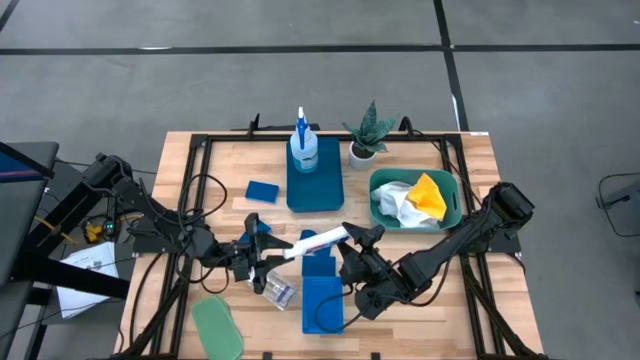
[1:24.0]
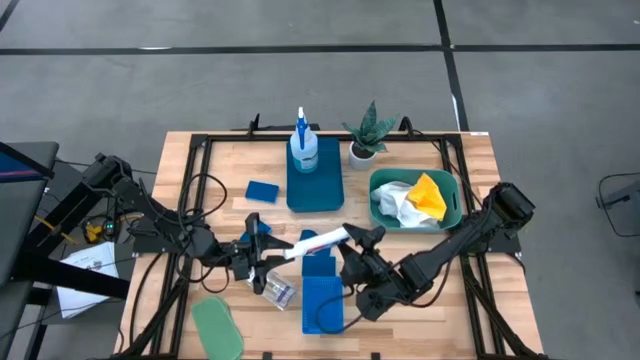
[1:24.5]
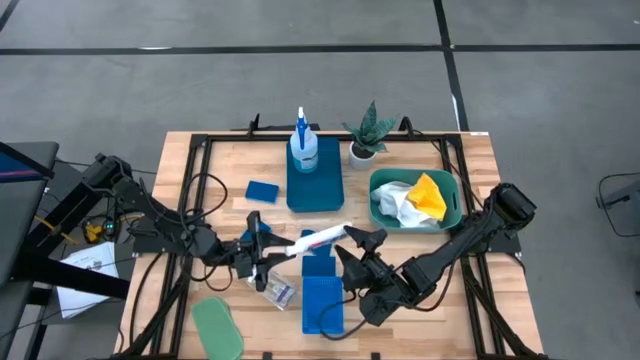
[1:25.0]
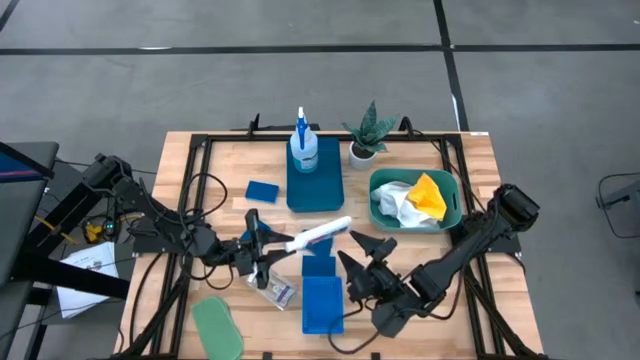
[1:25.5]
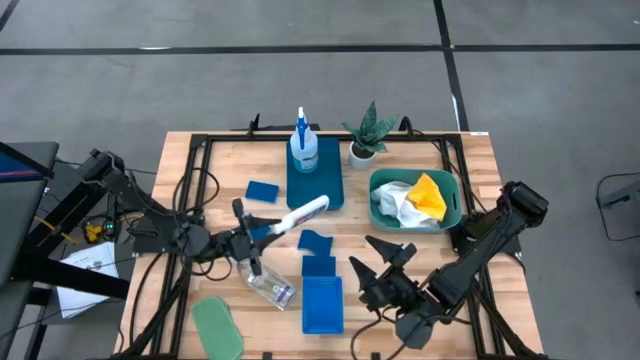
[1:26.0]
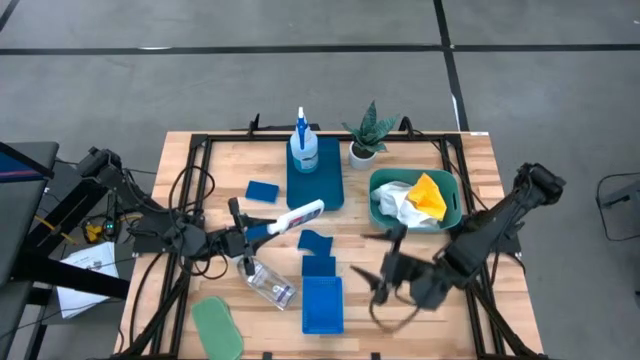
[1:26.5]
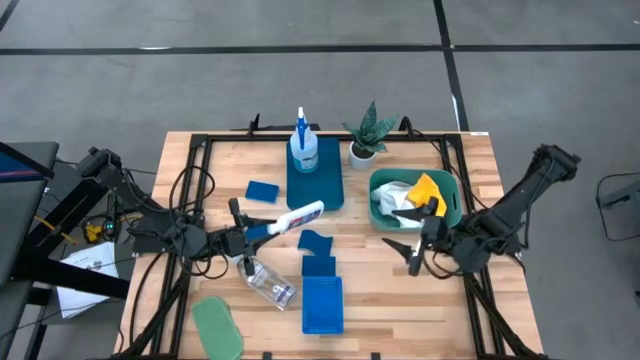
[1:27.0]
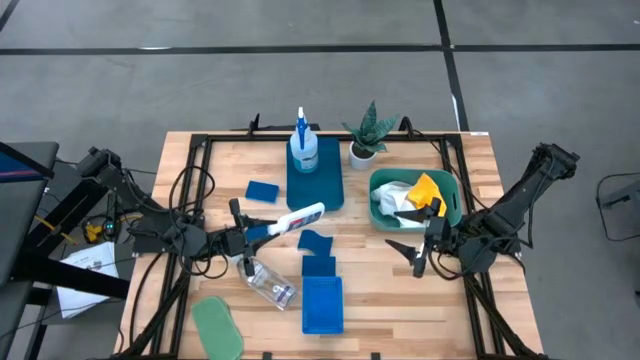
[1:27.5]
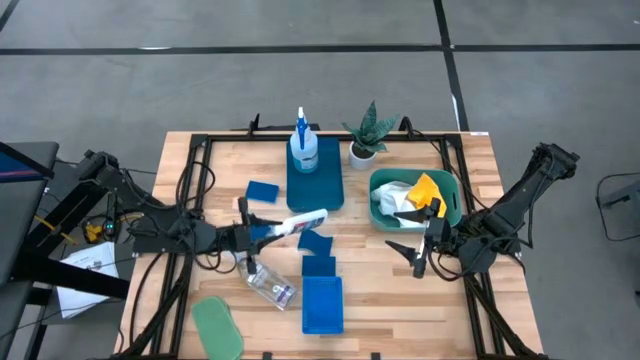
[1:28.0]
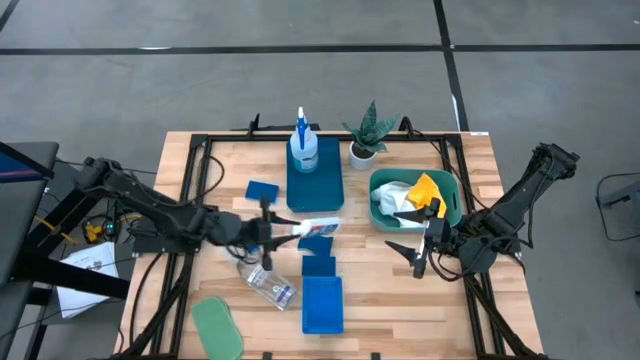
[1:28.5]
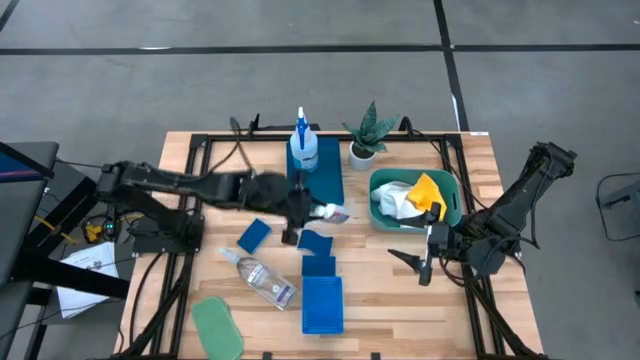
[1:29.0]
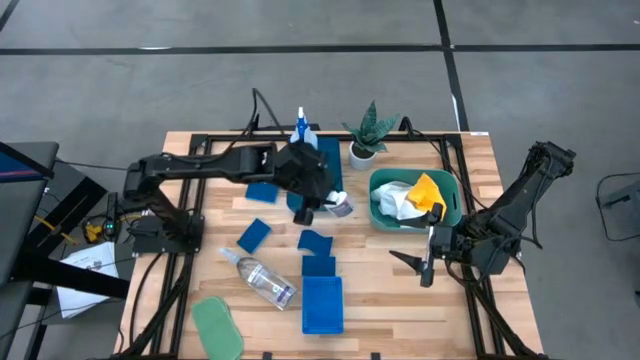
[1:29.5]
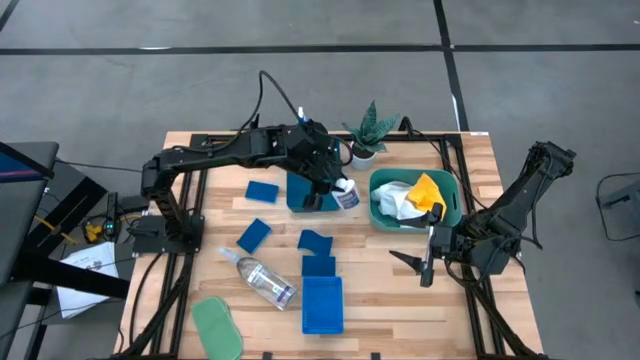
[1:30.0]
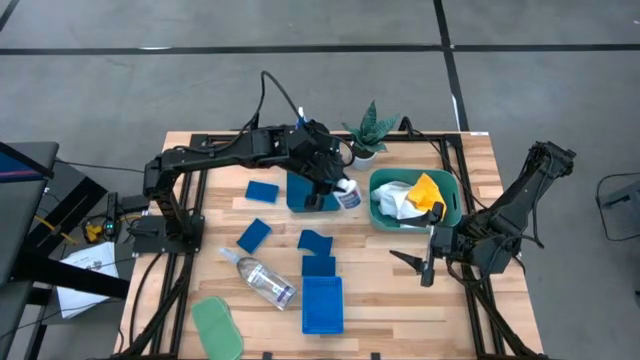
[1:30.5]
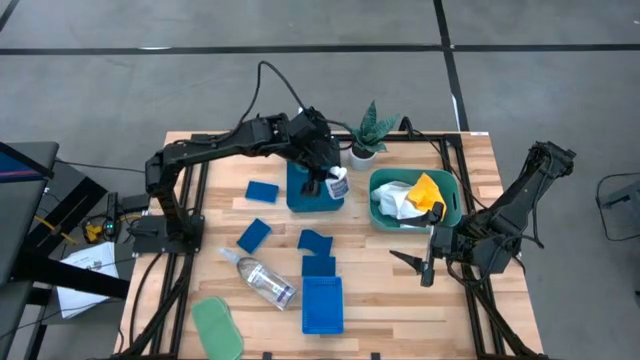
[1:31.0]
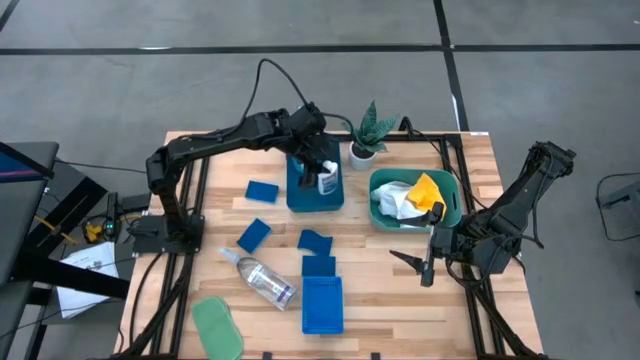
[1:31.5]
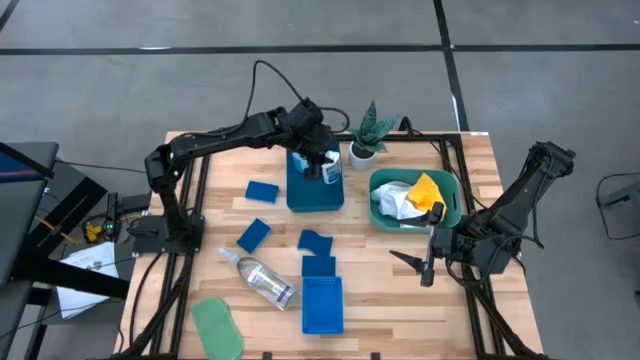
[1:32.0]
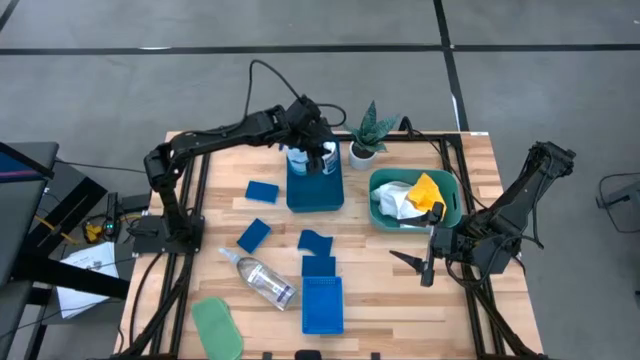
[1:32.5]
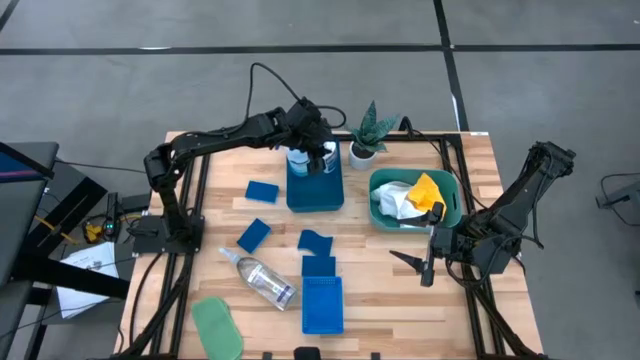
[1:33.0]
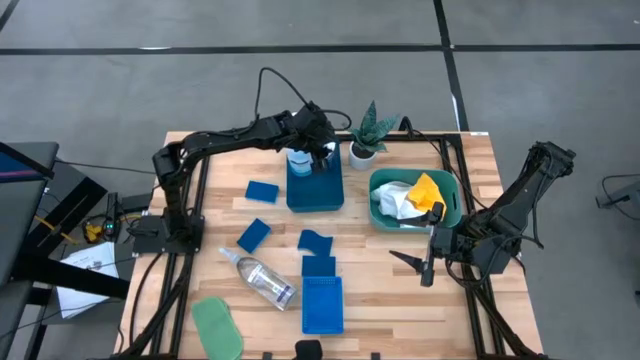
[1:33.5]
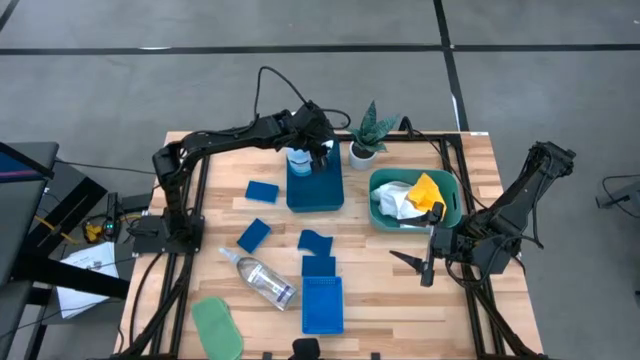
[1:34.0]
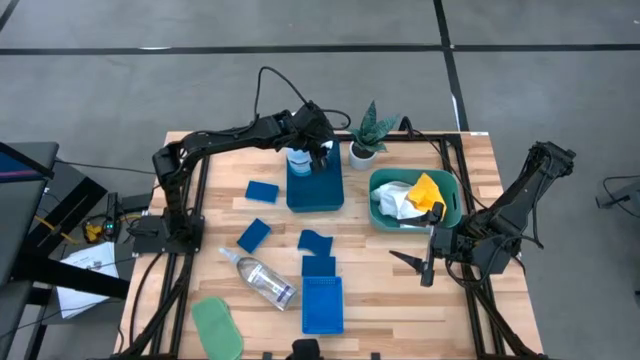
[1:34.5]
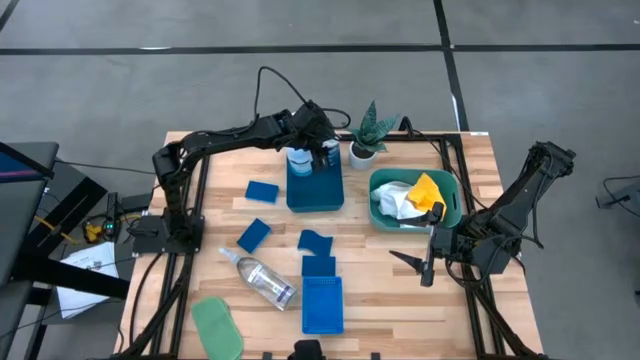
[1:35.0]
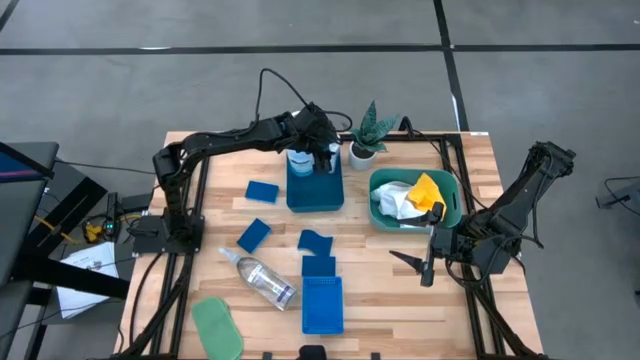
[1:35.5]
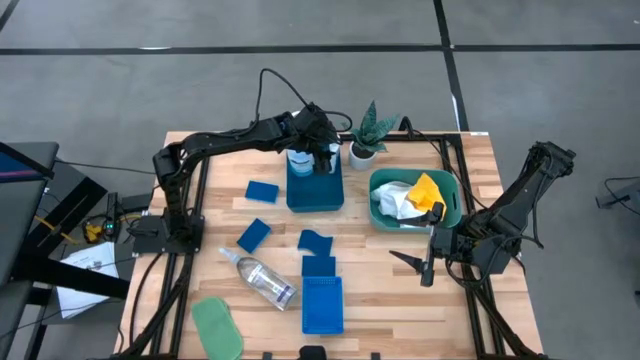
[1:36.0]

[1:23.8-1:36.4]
Task: Pick & Place Kitchen Items
Put the white plastic restorer bottle into the blue bin

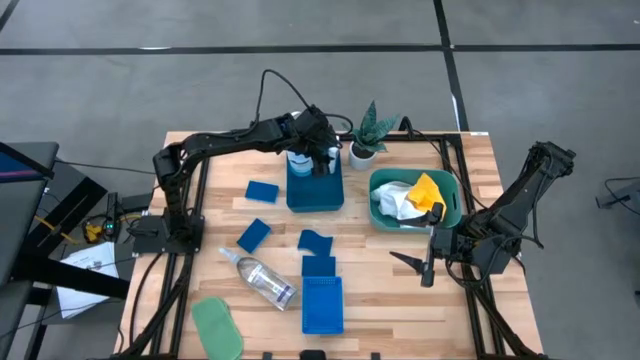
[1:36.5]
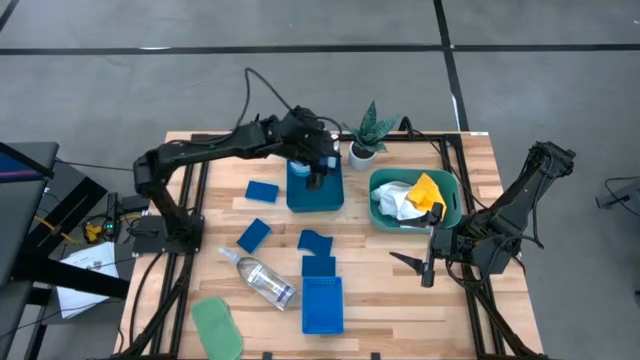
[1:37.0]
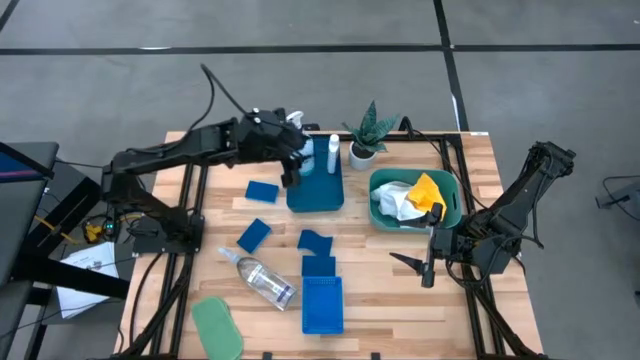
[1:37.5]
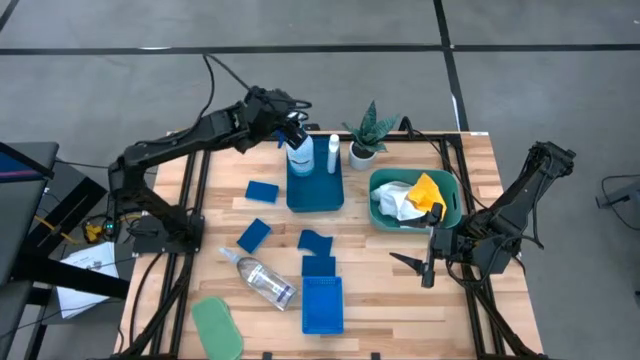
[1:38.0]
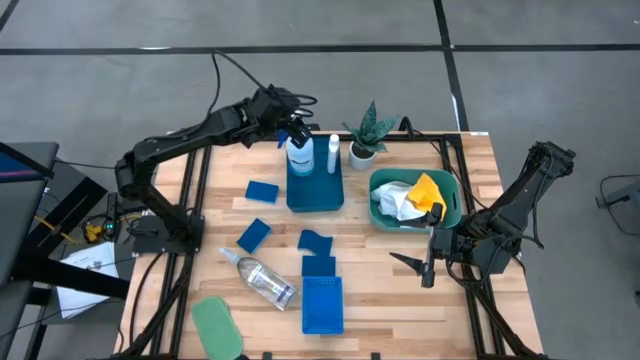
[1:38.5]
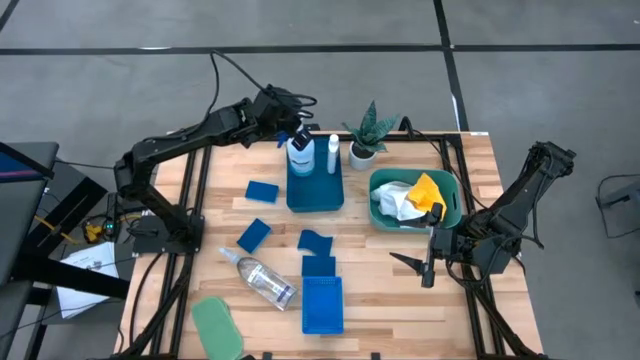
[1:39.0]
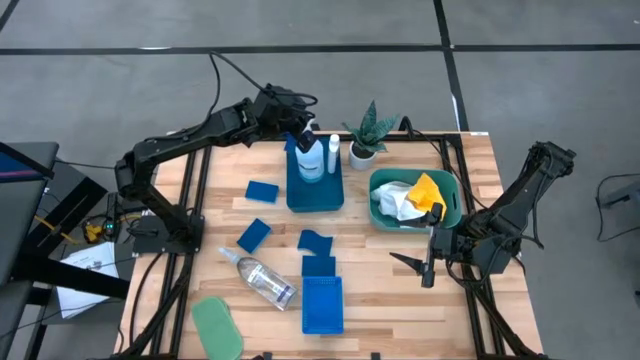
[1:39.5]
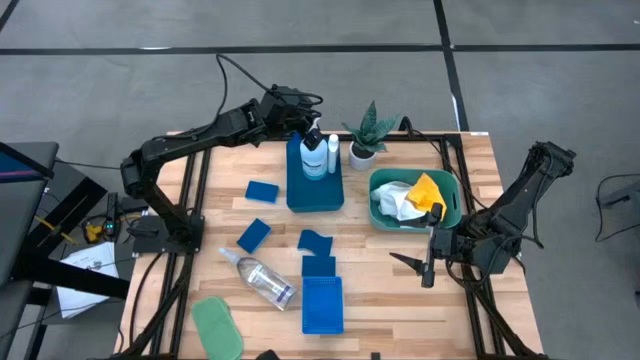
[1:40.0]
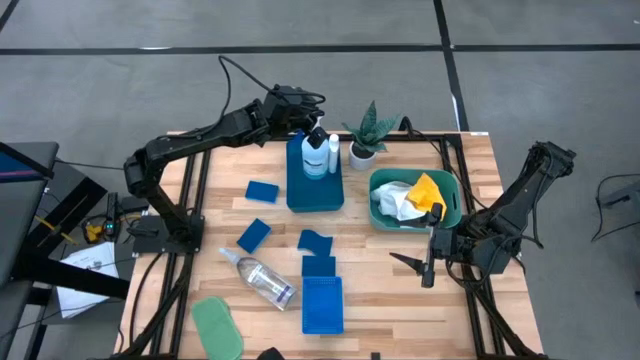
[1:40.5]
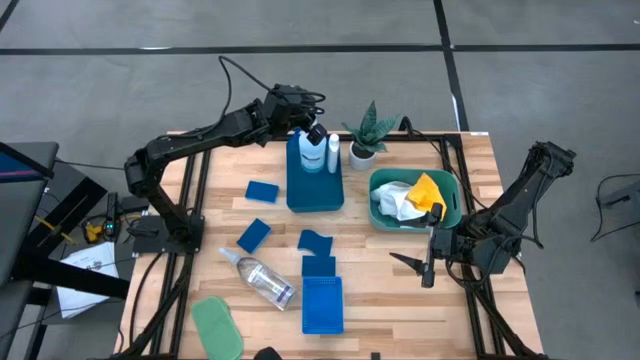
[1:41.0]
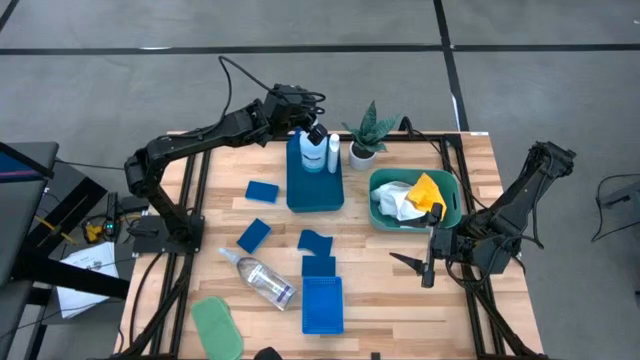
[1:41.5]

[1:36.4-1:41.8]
Adjust the blue spray bottle in the blue bin

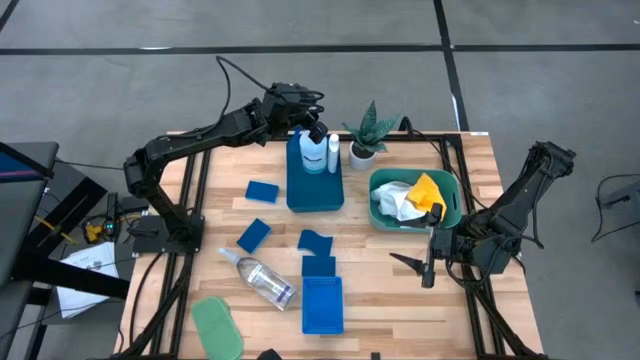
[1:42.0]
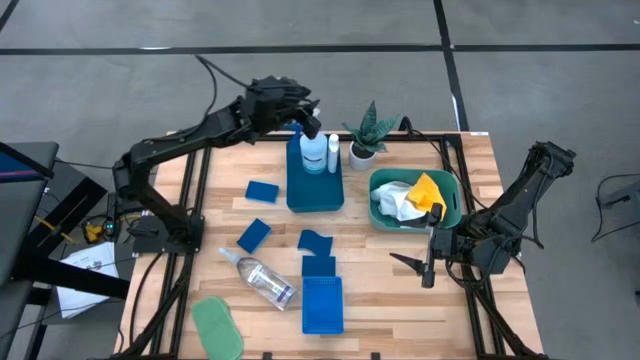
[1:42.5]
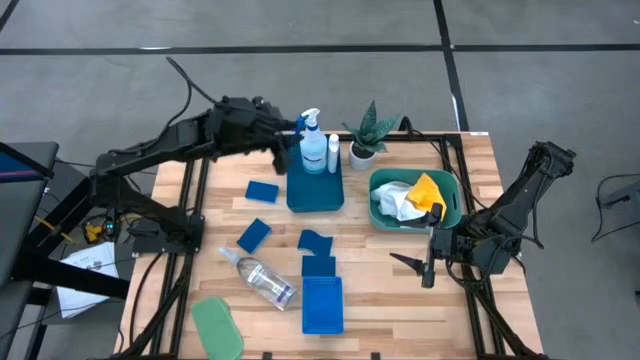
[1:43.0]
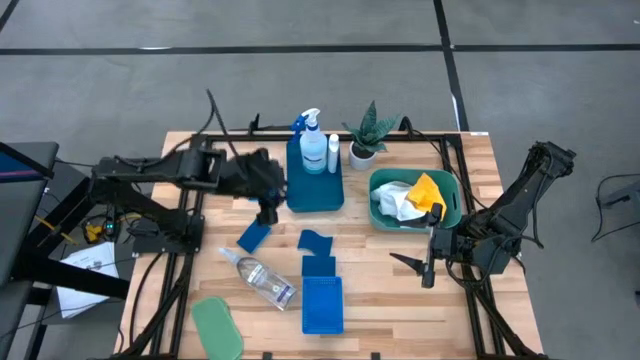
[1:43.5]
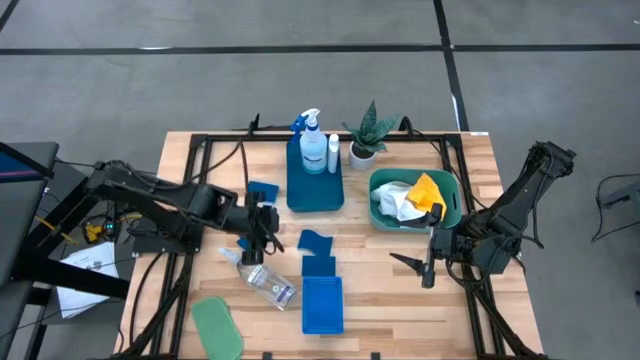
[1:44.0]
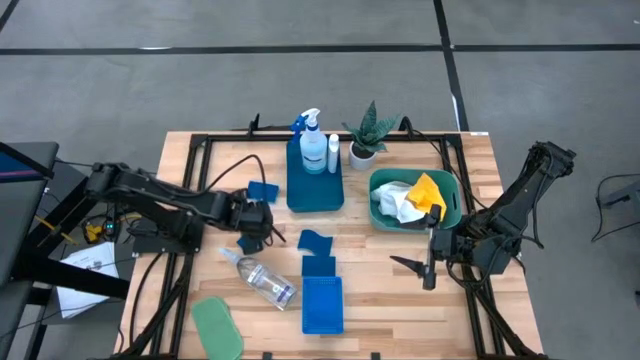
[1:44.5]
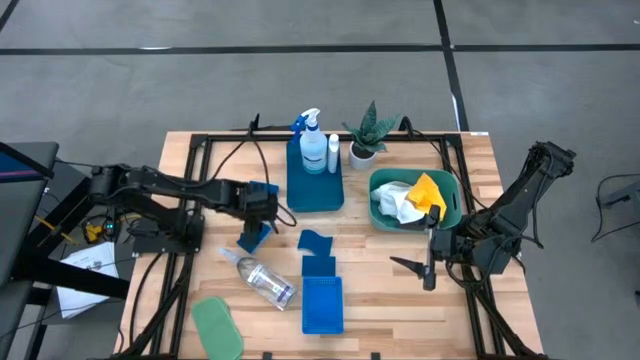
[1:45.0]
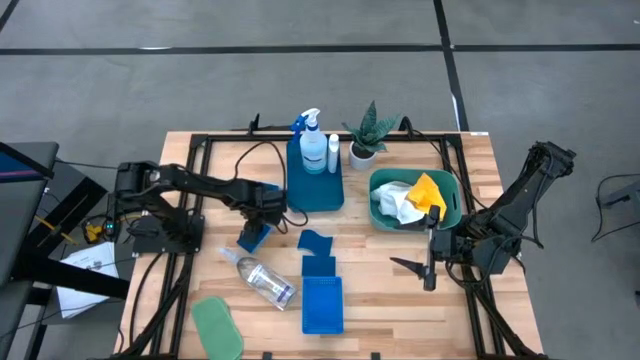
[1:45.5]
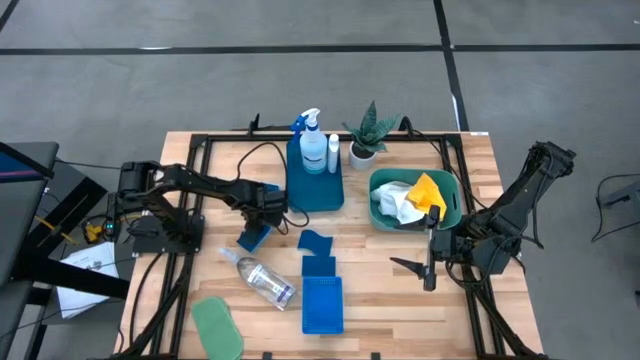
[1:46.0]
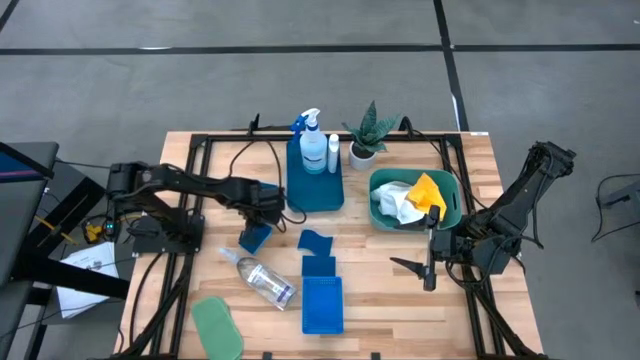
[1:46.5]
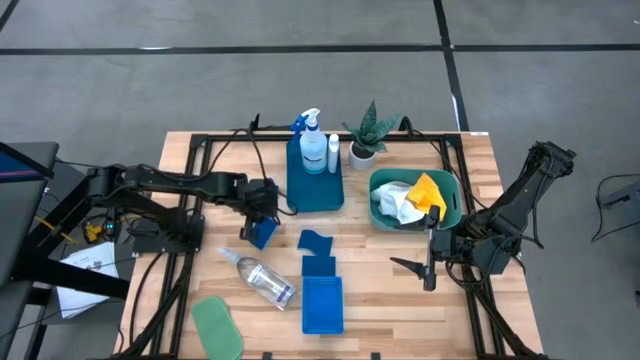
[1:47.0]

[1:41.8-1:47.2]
Put the blue sponge into the blue basket
